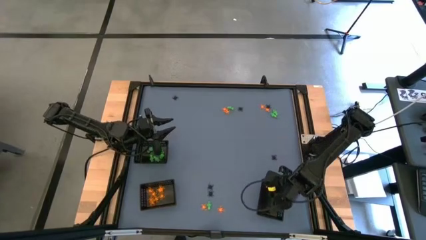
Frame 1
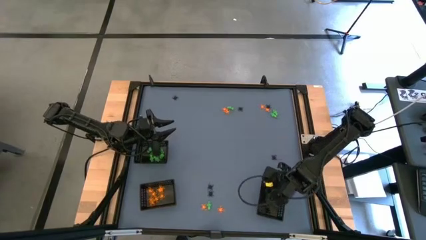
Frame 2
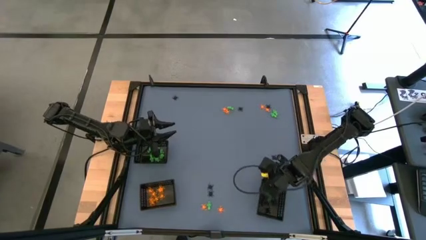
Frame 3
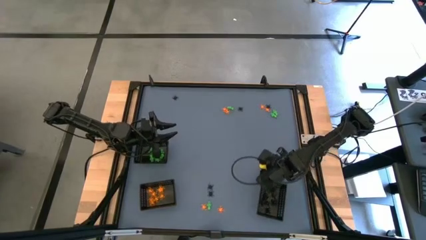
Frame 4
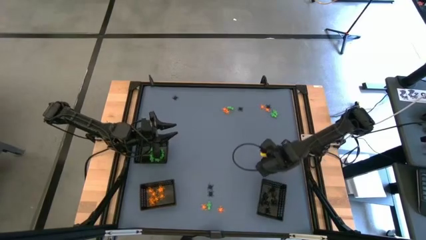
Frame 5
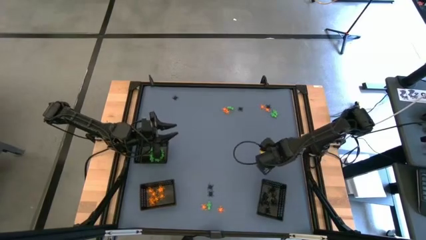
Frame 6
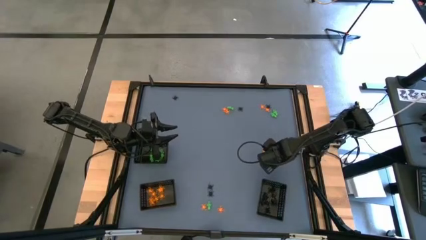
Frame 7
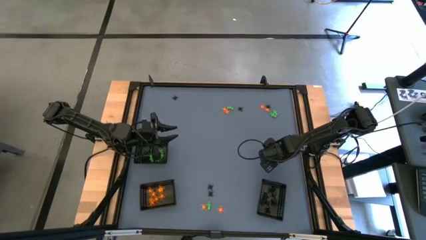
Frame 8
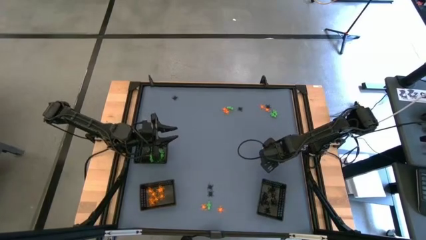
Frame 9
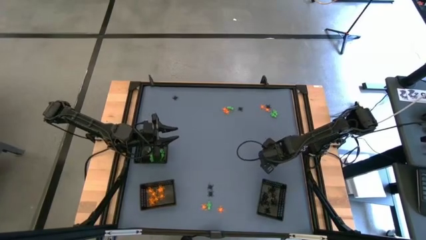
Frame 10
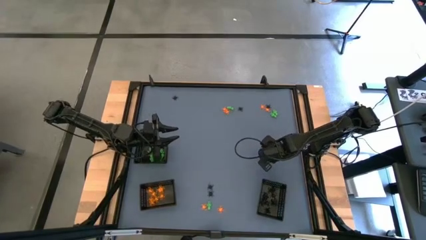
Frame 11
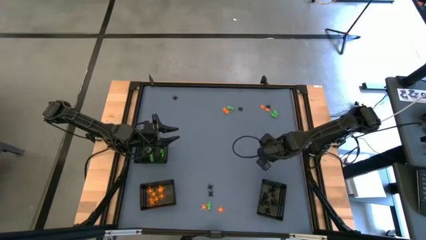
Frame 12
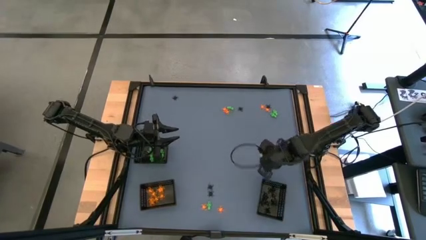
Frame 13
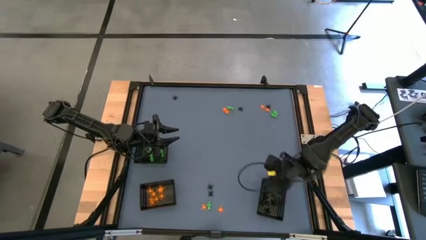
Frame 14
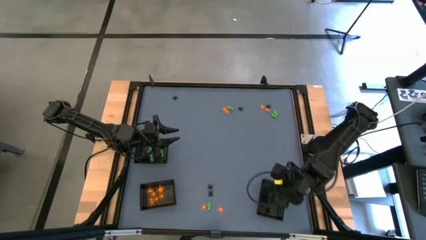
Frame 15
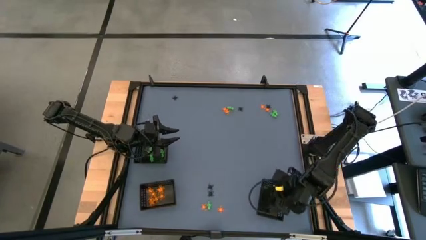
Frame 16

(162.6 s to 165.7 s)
Task: Sort Halloween decoration
Put the black spider toy into the bottom right black bin

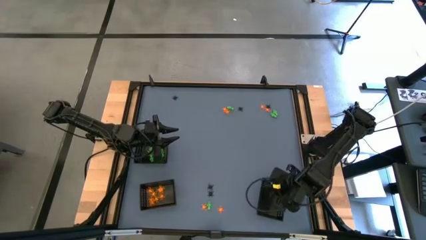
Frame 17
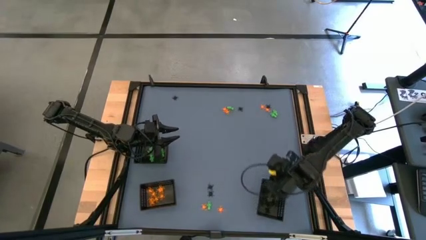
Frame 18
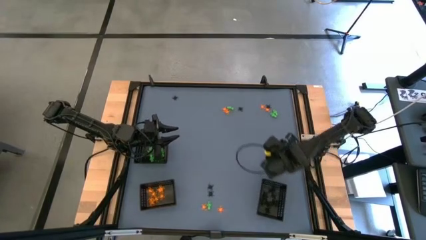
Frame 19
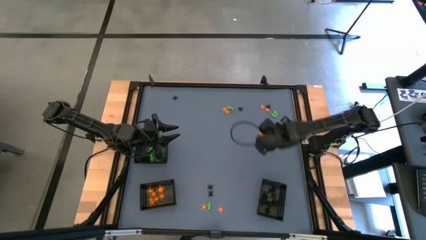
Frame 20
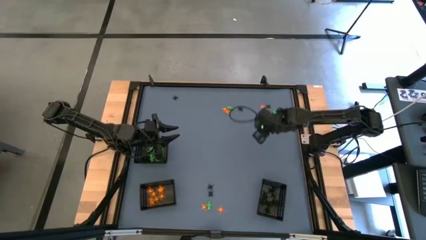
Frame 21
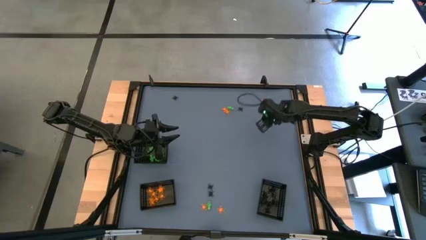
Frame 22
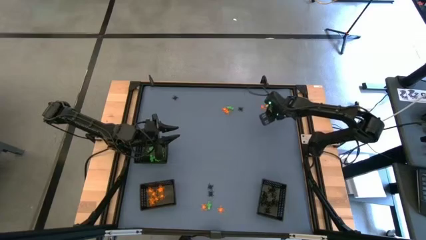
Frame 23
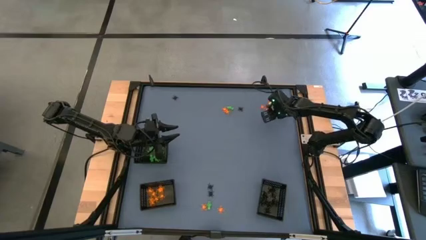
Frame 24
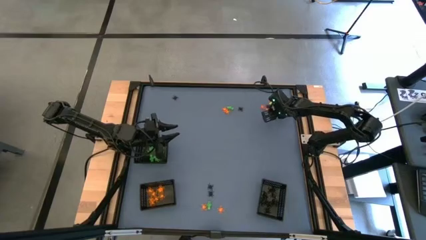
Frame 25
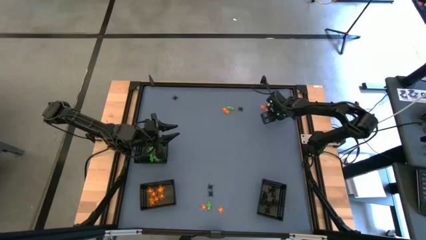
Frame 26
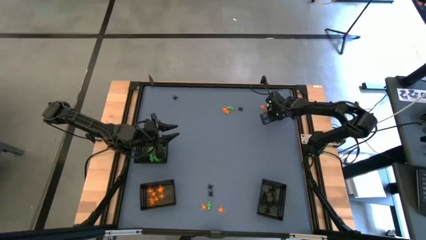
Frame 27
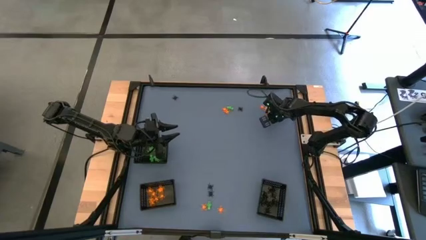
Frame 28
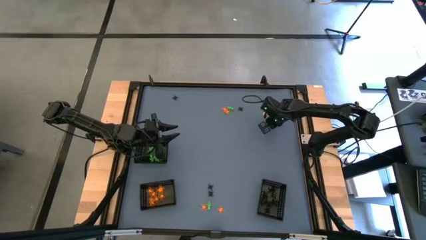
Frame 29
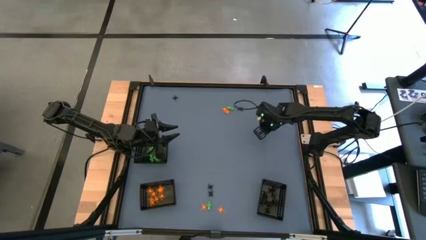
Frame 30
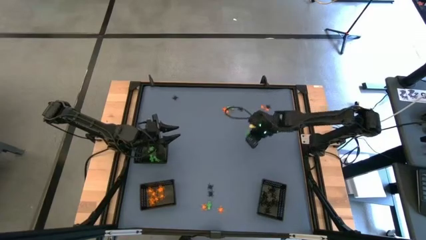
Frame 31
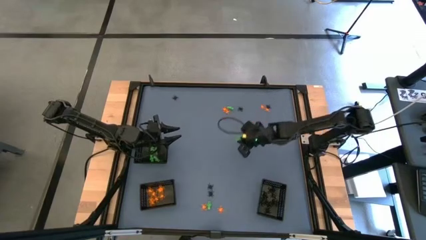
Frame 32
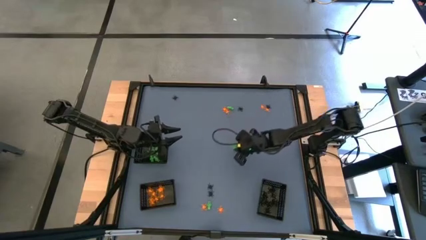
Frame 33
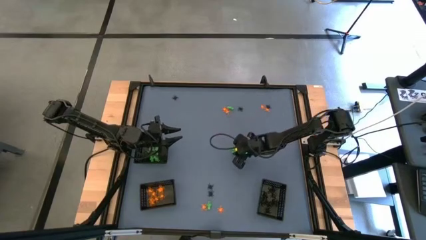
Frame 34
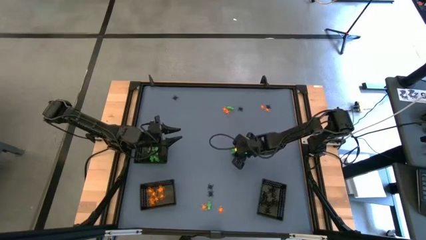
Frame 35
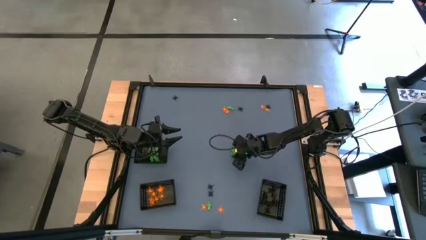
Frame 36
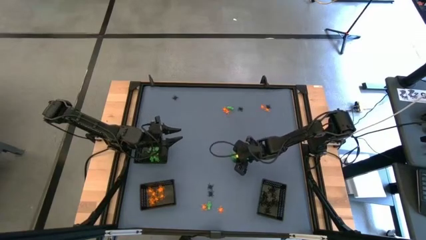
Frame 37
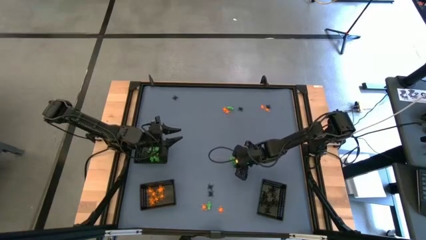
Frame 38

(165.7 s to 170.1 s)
Put the green skeleton toy into the top black bin

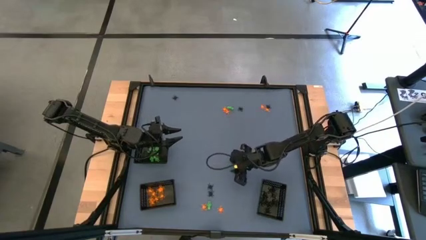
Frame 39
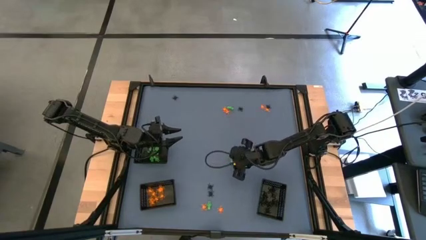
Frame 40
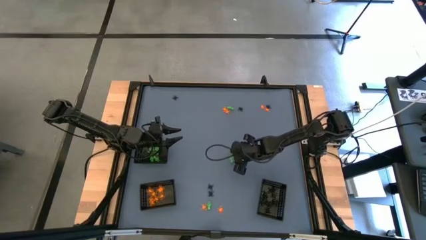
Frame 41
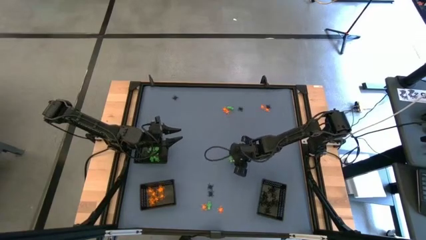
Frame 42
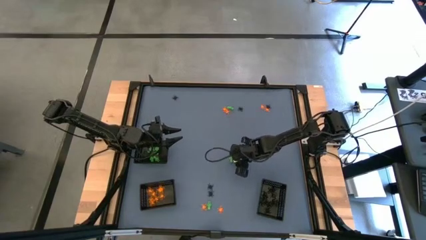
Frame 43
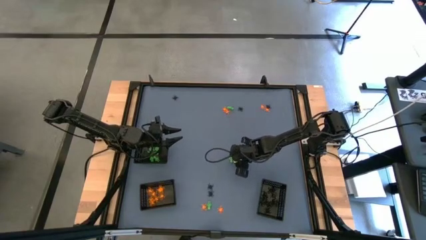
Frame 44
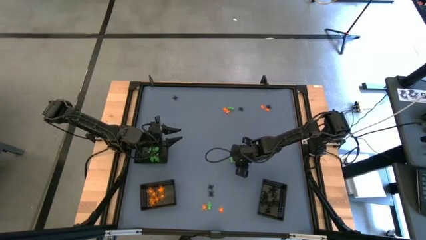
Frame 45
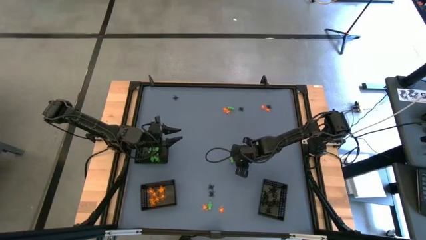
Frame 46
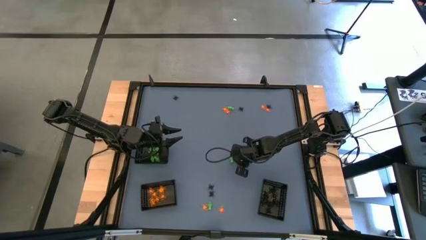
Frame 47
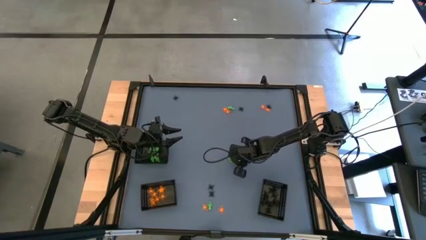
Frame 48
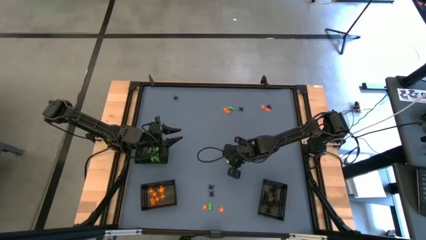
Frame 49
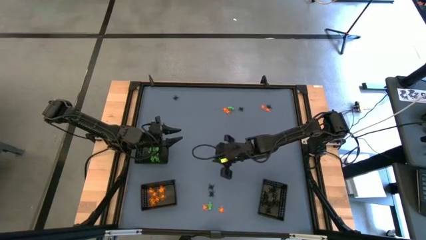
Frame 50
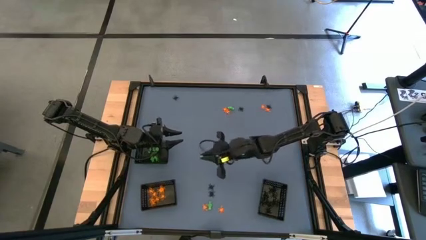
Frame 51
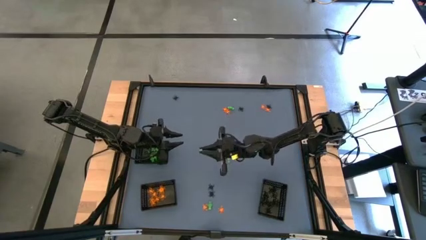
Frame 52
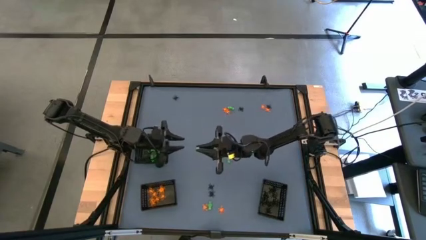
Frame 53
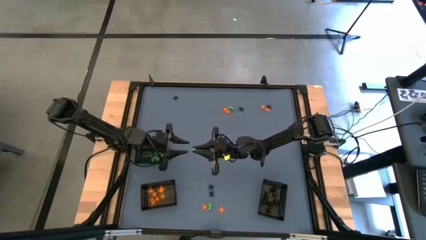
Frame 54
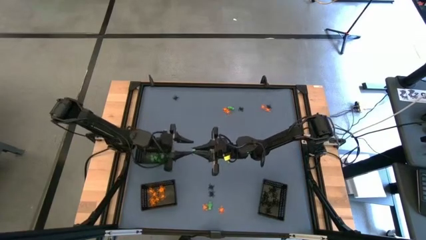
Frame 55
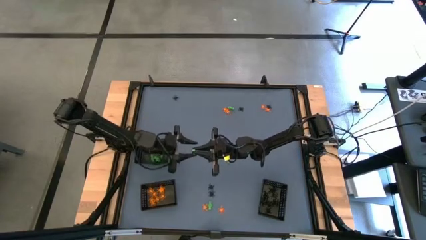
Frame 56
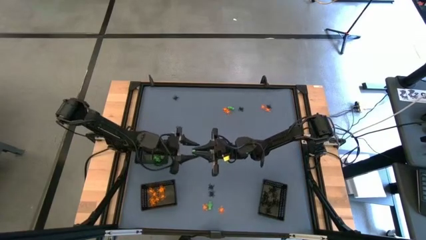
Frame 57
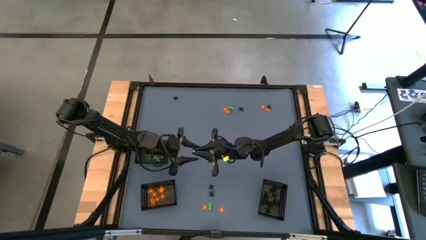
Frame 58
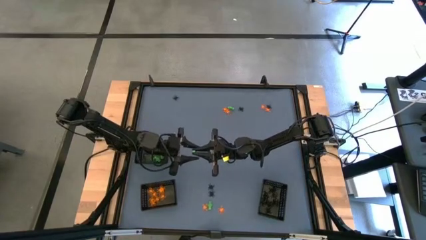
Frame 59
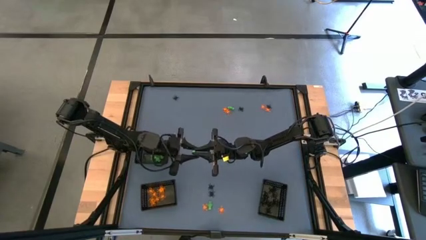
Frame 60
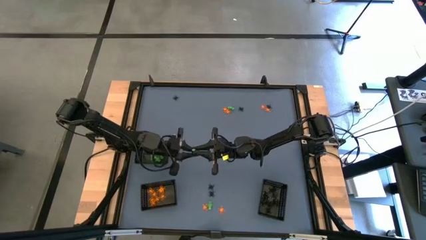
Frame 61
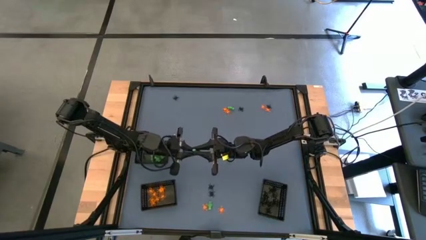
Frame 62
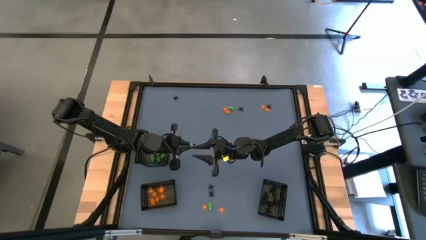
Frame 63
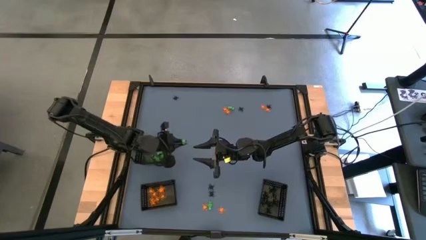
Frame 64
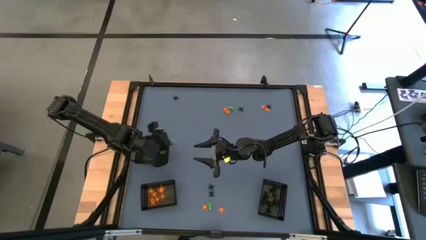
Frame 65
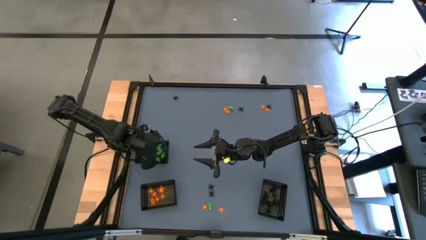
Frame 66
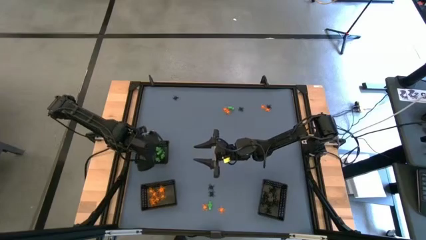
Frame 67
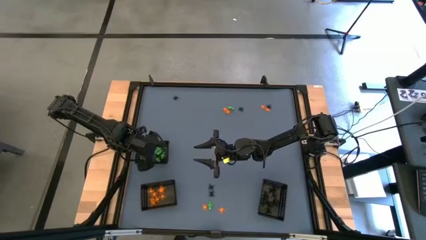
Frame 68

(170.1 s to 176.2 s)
Put the green skeleton toy into the top black bin

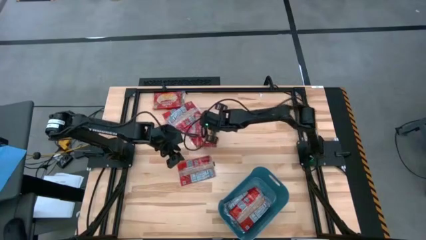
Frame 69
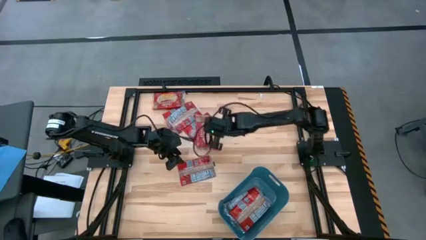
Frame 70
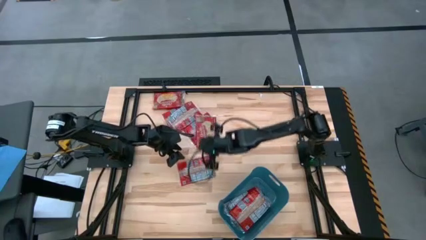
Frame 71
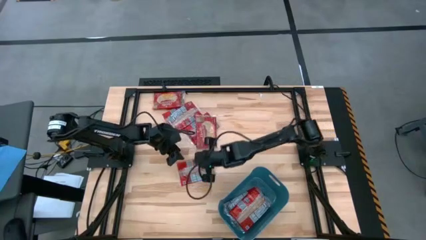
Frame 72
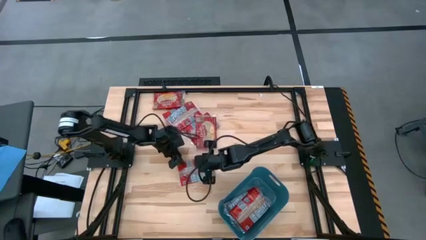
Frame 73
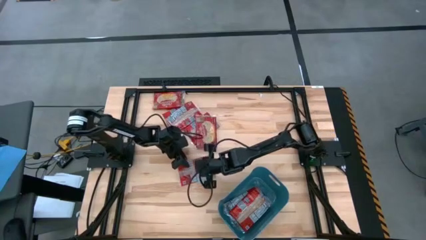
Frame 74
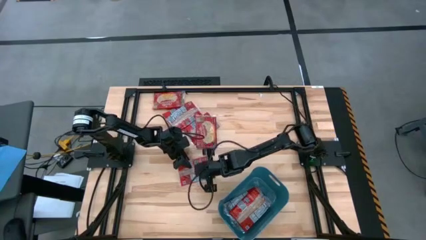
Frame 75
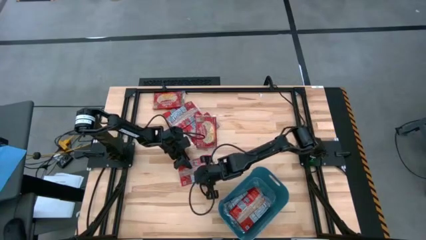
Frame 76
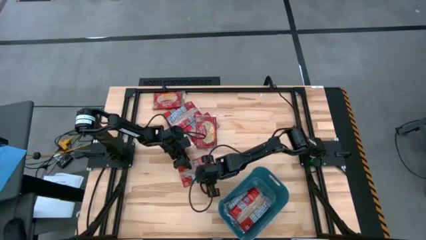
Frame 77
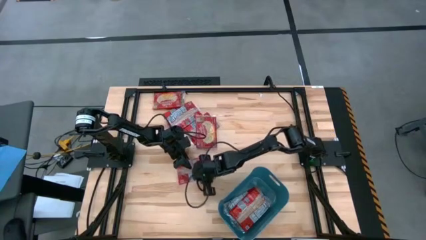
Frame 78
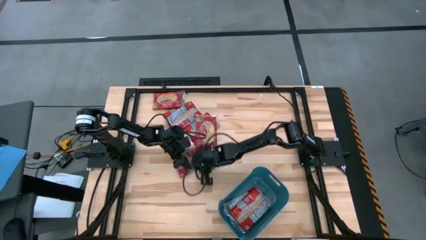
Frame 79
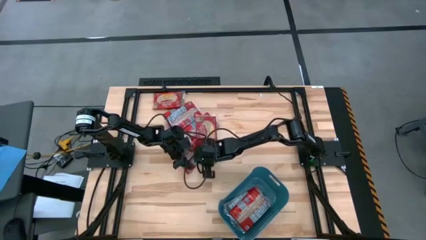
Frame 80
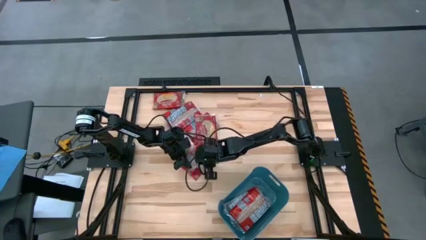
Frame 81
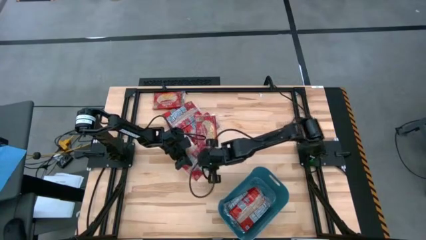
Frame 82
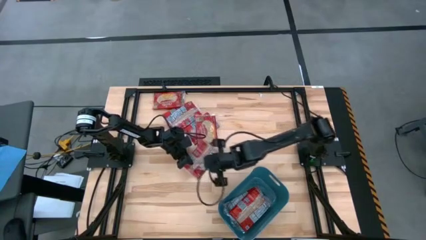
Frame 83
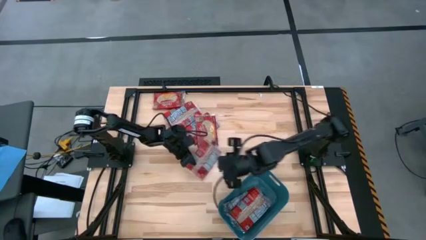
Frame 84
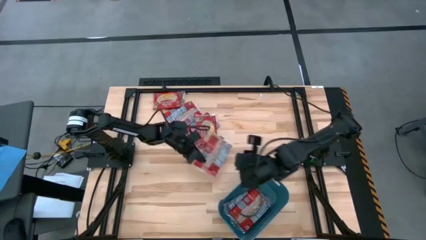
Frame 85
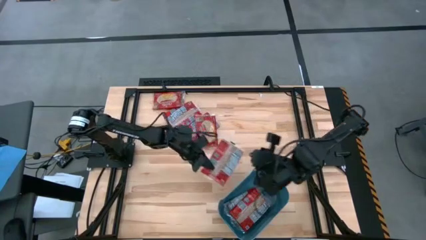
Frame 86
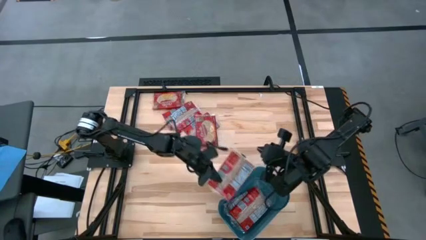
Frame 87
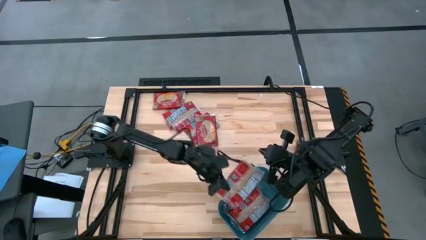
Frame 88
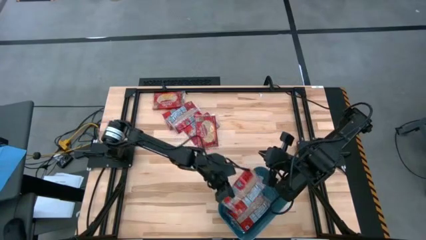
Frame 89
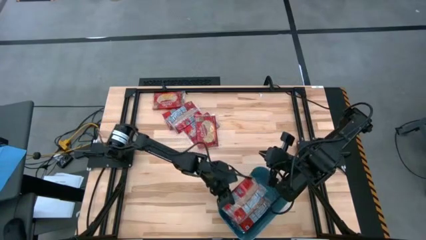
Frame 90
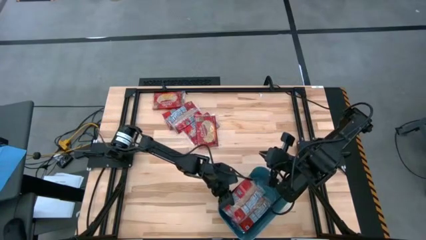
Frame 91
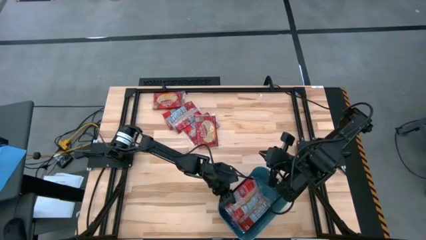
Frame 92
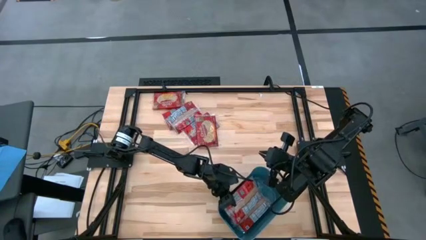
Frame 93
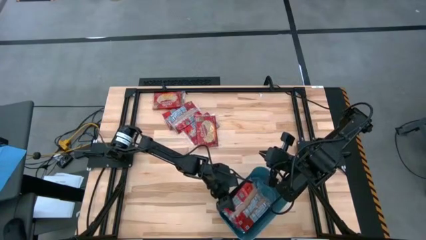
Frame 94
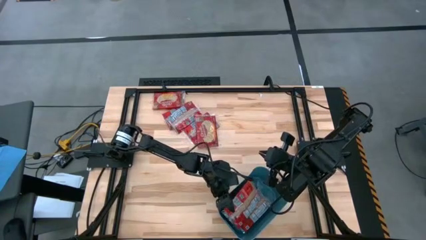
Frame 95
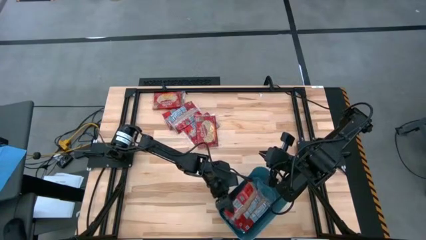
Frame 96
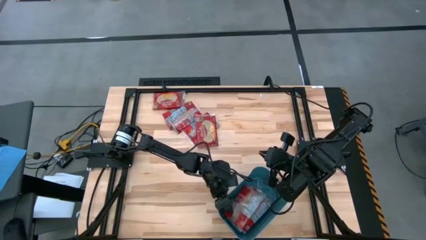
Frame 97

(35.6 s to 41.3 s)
Task: Sort popcorn bags into baskets
Put the popcorn bag into the blue container
